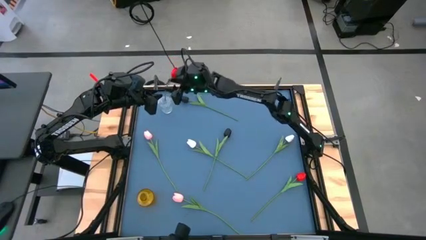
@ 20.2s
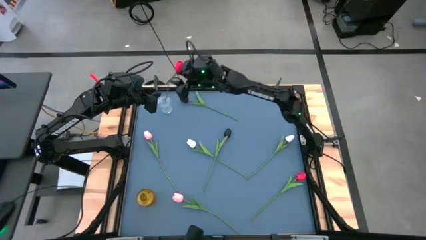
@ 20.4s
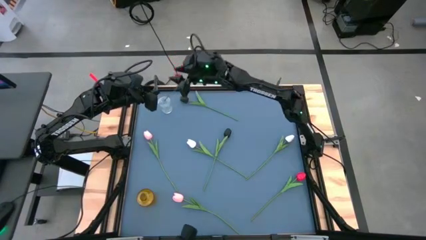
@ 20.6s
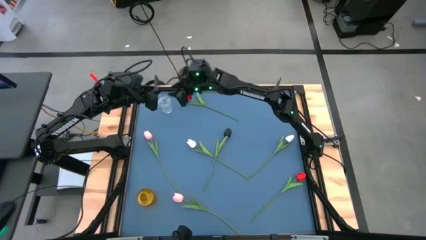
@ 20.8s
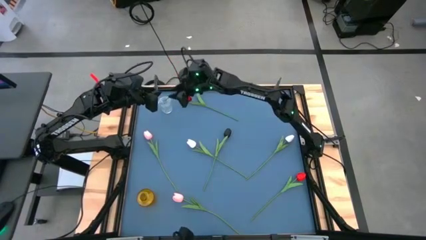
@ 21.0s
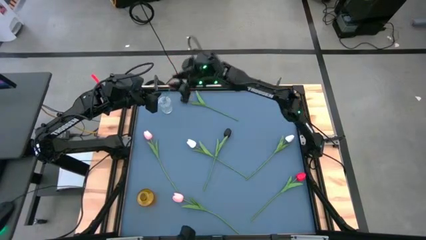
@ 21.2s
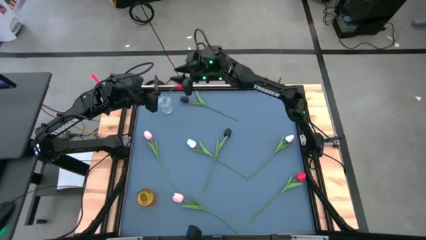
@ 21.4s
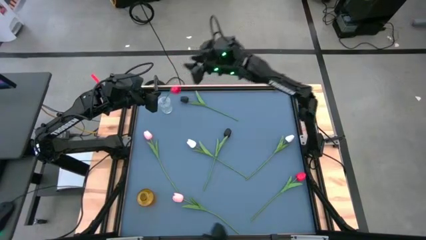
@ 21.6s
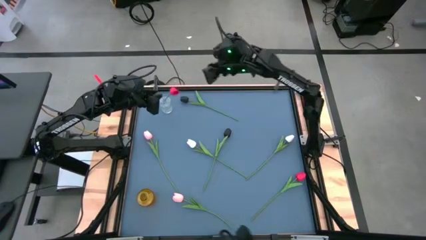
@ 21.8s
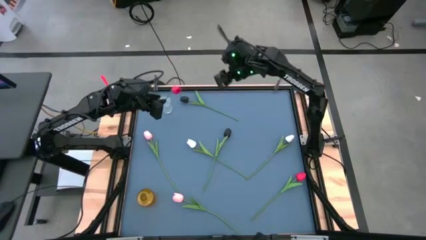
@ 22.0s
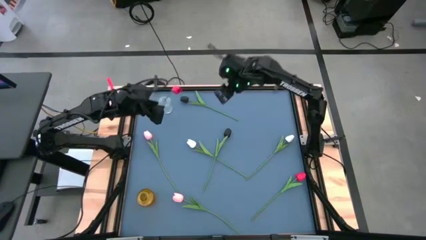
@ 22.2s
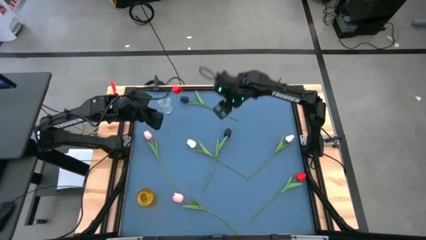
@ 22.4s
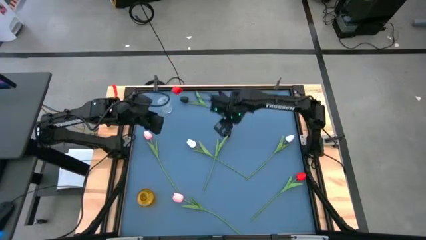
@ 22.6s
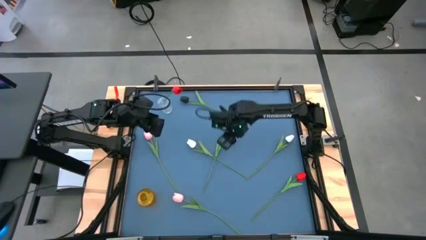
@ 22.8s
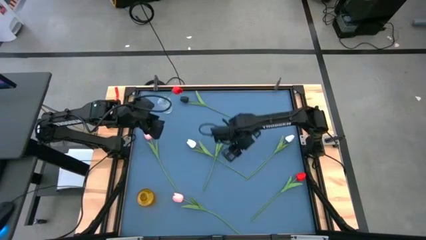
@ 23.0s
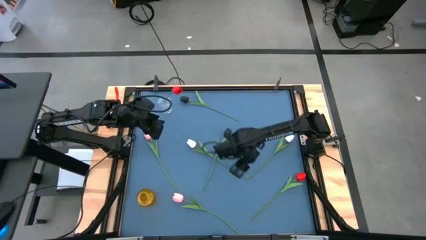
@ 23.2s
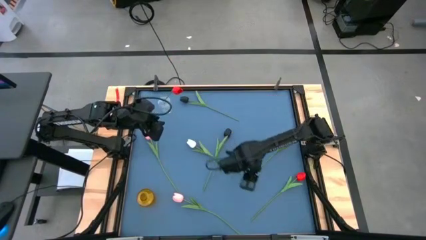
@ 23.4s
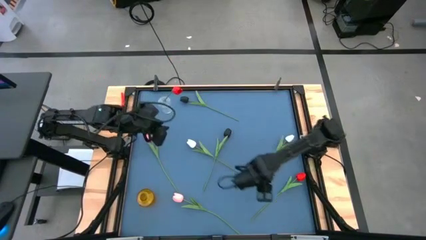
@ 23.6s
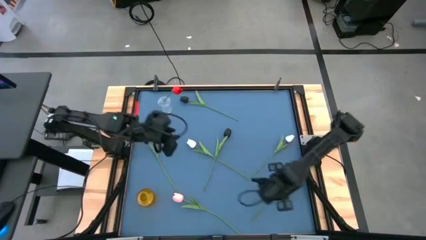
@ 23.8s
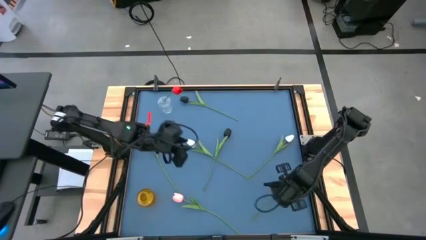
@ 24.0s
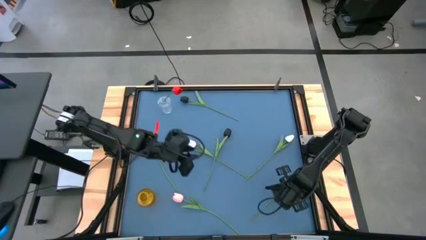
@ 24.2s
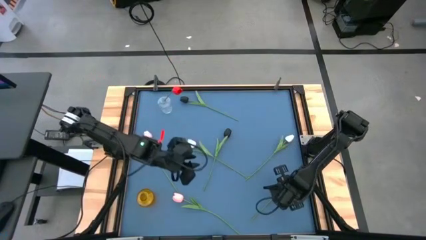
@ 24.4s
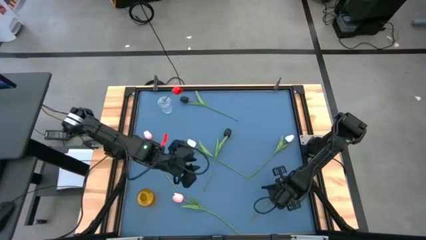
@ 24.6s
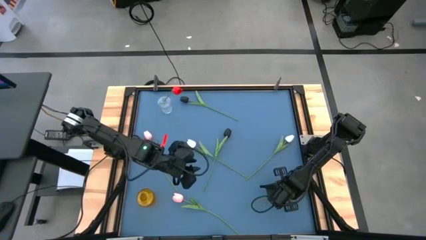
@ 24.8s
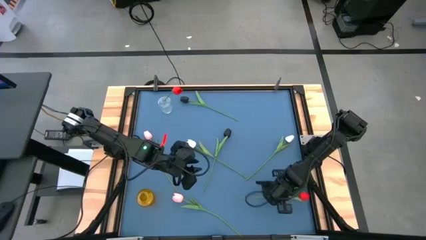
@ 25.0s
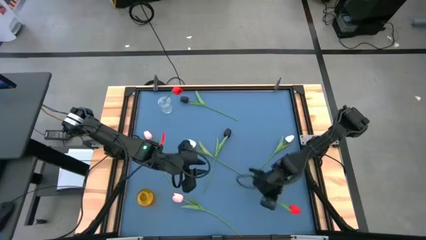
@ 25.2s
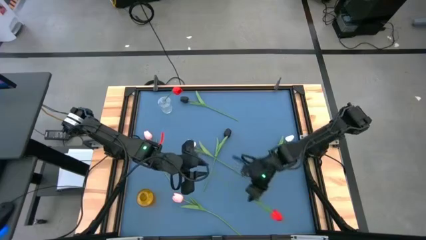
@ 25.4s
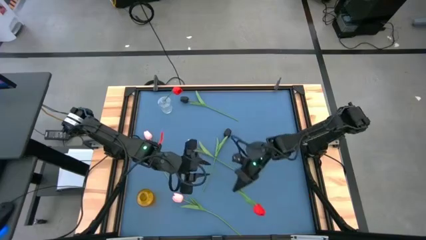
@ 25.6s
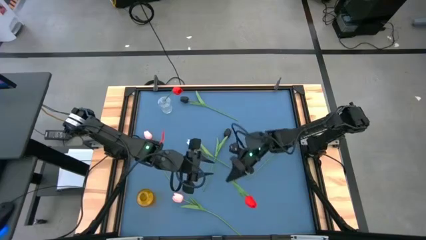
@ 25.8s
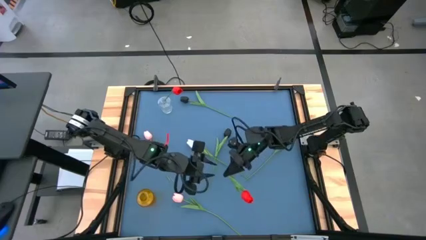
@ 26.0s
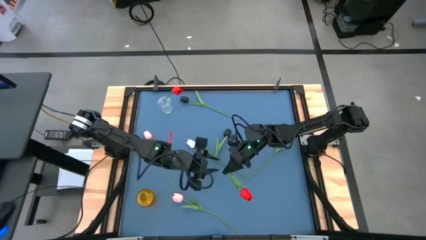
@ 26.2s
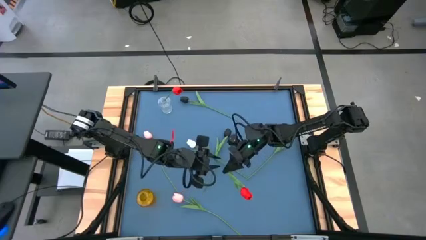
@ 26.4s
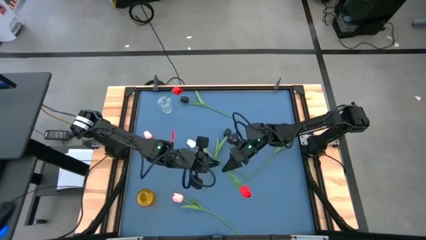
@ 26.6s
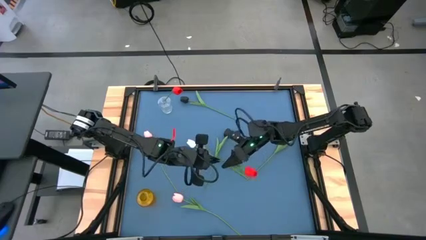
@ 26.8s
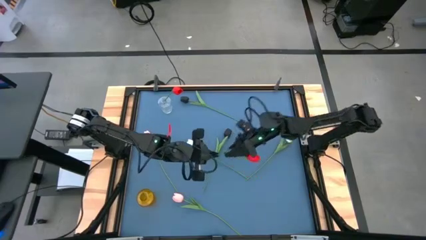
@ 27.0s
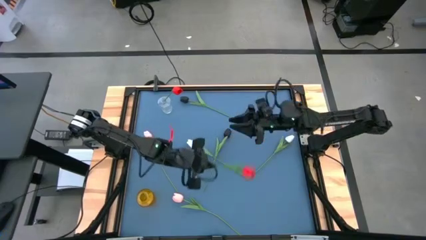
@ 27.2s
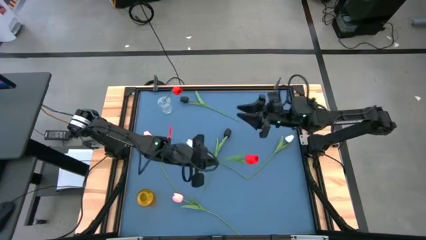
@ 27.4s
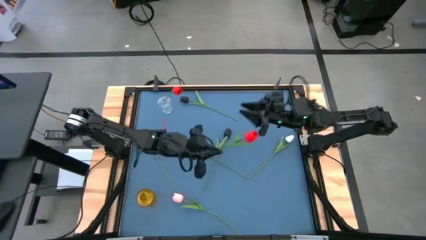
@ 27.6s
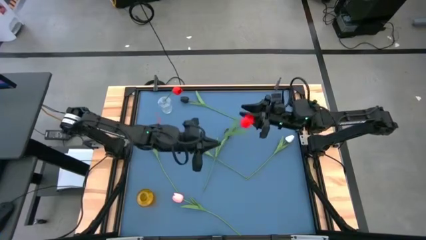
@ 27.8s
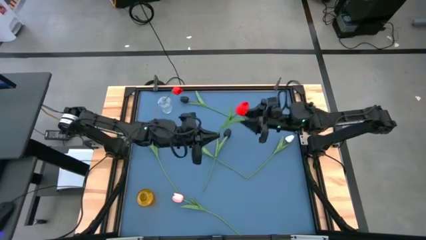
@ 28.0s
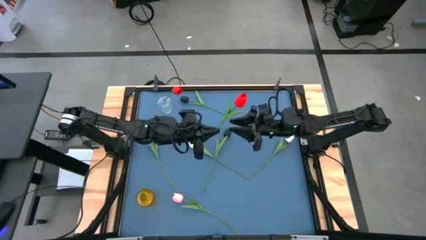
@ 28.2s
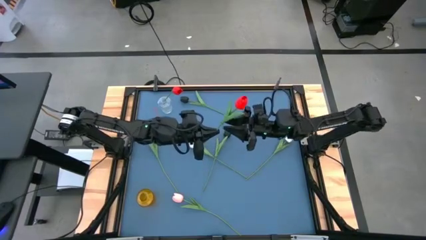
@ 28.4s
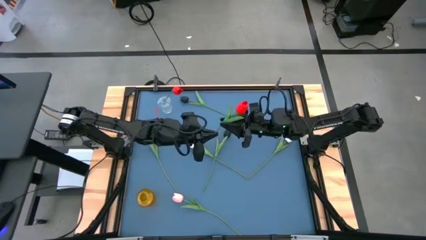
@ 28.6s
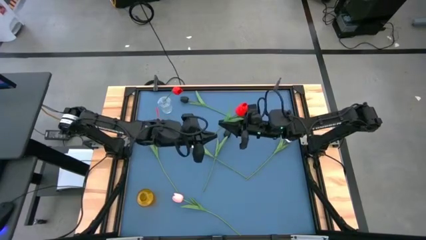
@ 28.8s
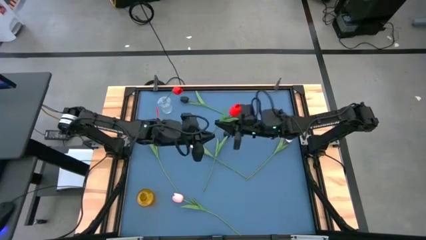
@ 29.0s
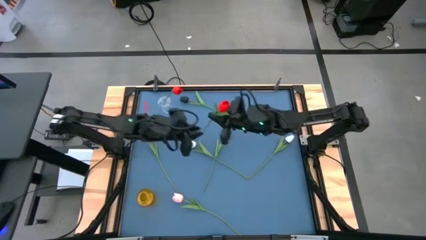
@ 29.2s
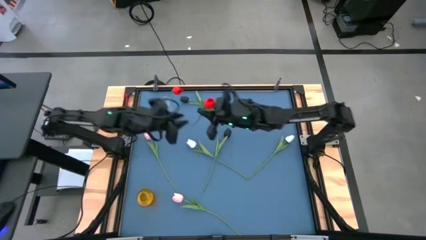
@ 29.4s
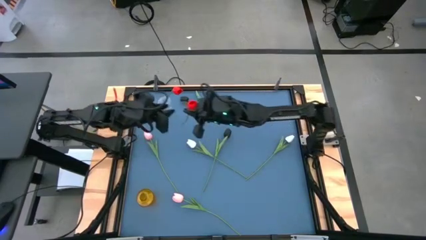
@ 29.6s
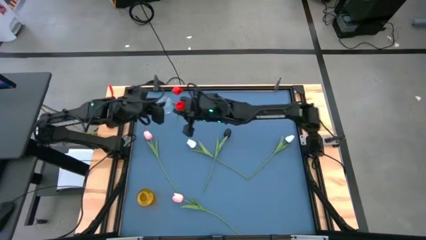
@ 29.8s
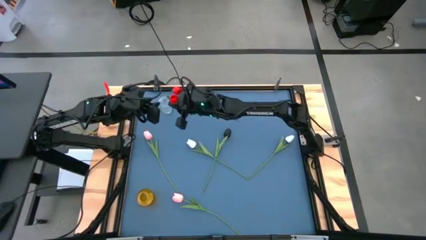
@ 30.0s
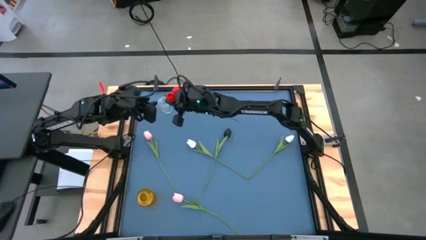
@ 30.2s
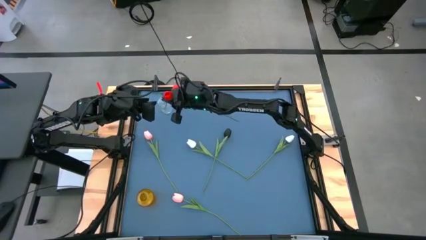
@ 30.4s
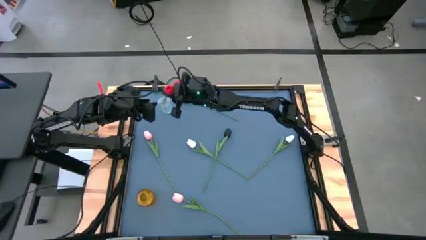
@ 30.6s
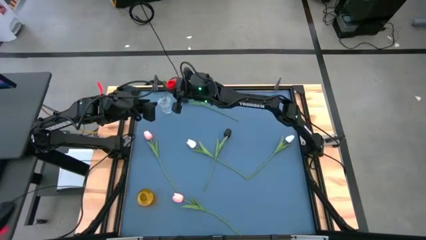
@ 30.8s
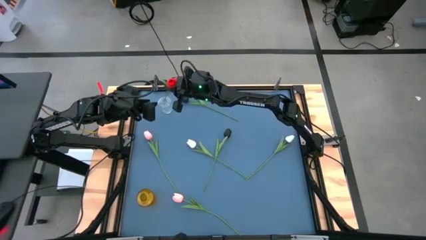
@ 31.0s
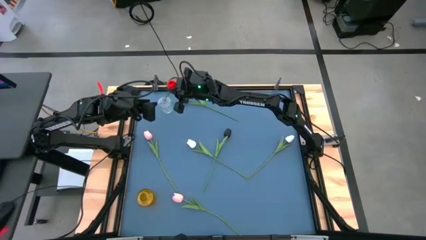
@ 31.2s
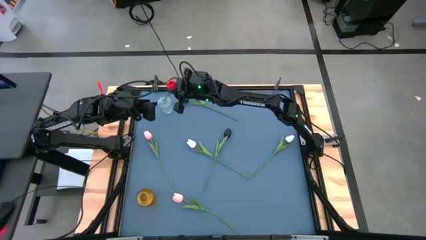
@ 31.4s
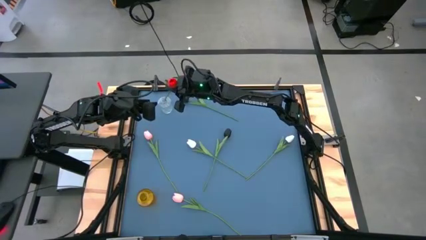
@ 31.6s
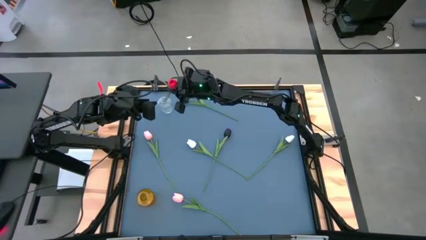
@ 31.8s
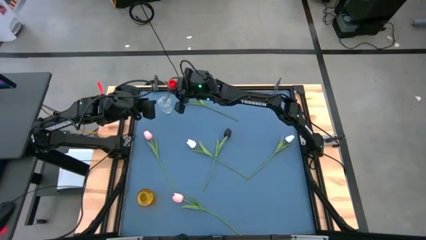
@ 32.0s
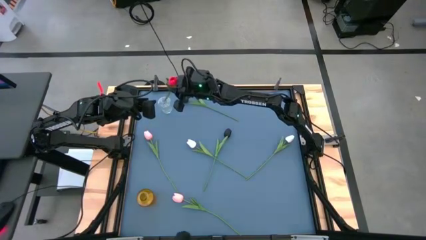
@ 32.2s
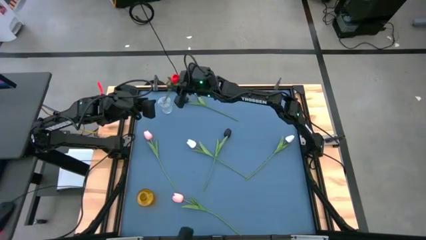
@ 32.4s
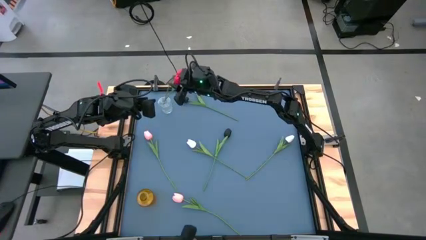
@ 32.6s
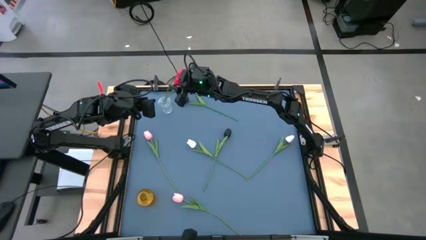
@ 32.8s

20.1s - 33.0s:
Task: Sort flowers into vase by color
Put the red flower into the transparent vase
